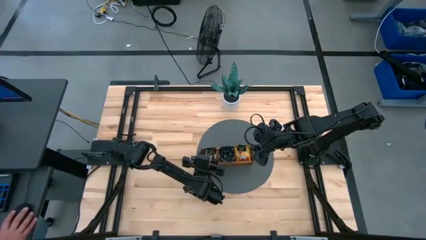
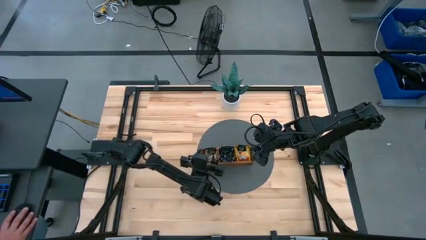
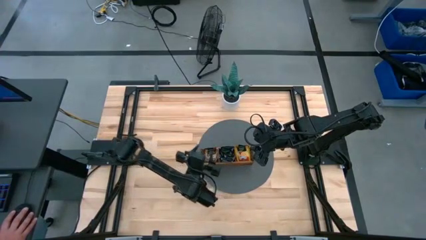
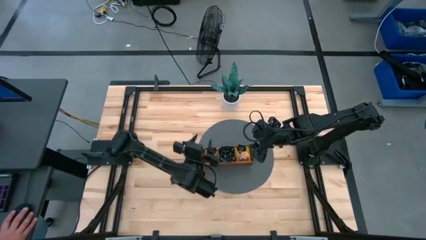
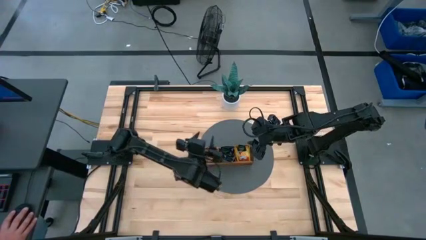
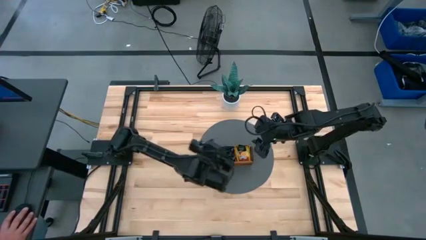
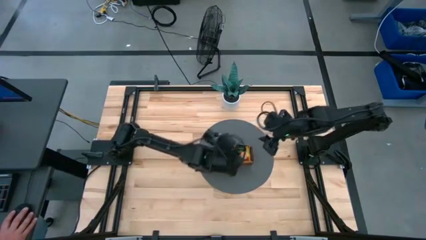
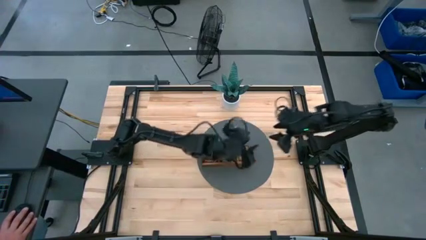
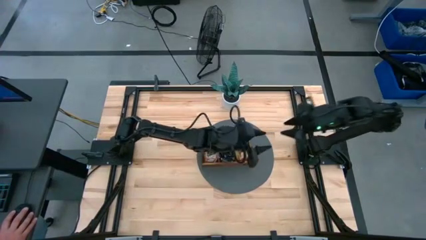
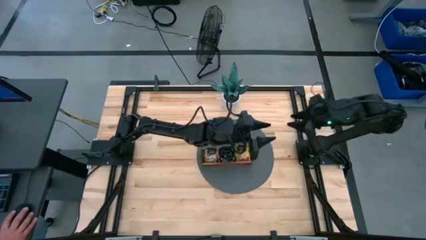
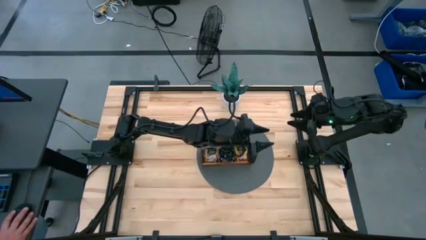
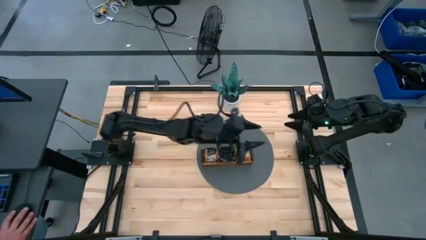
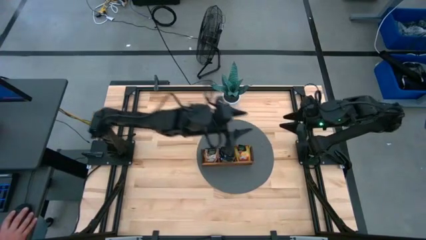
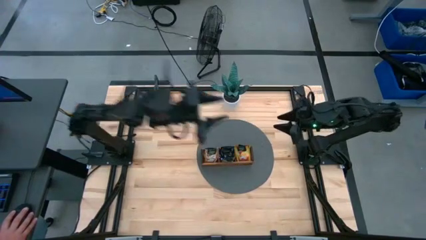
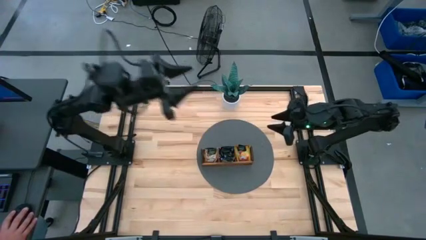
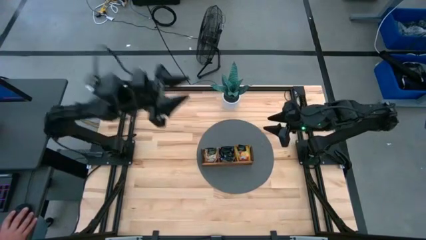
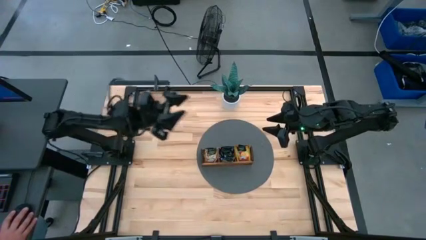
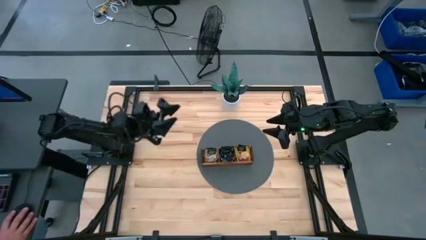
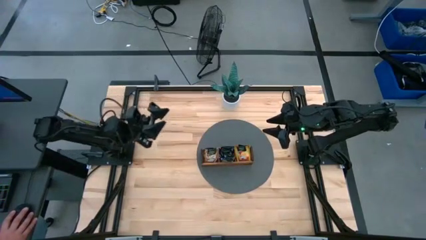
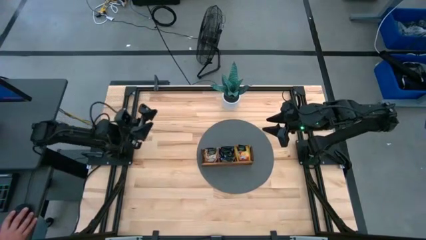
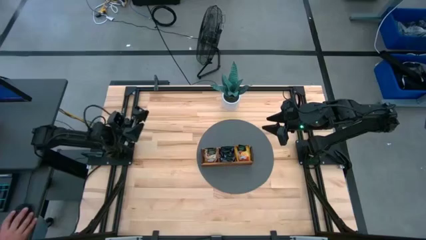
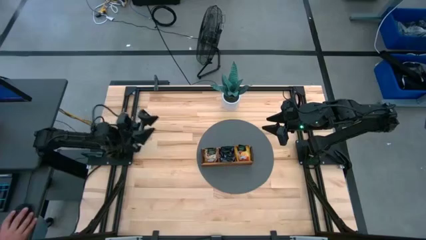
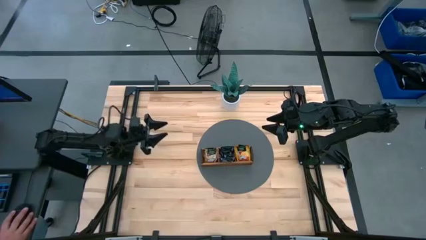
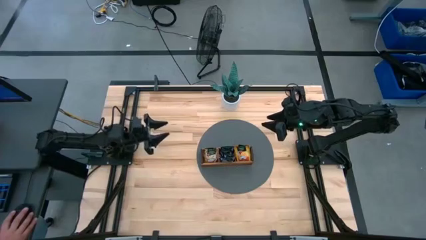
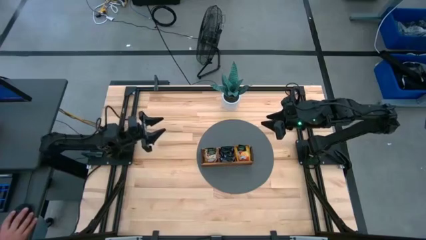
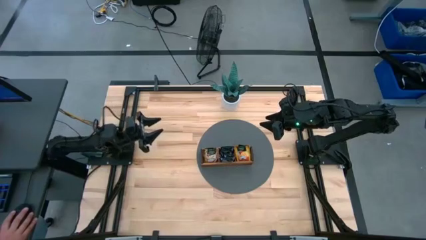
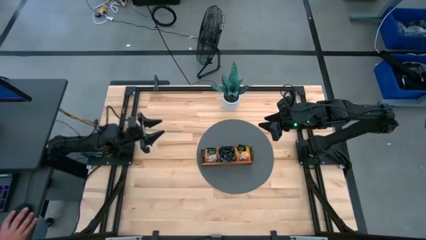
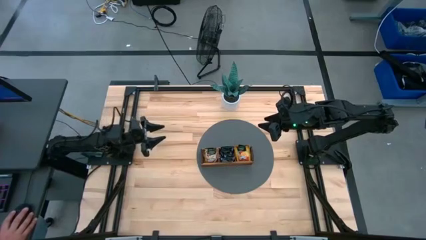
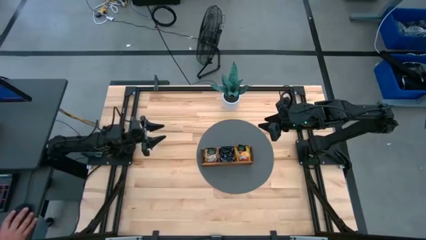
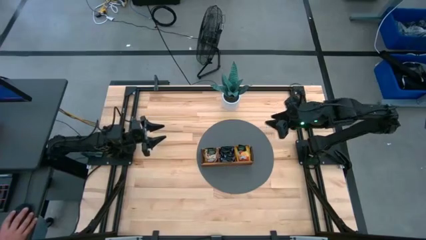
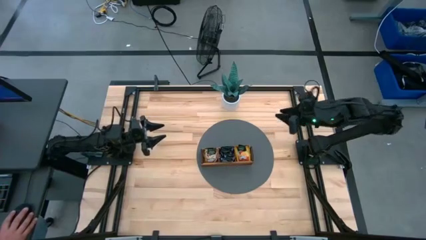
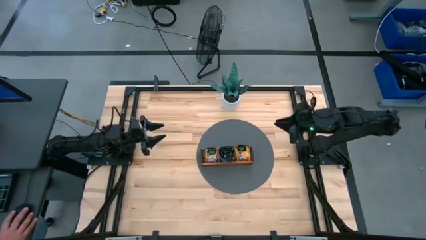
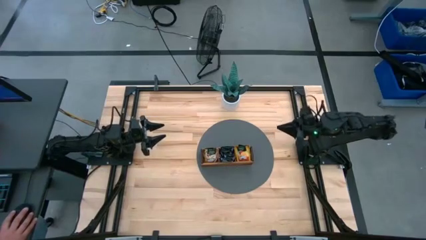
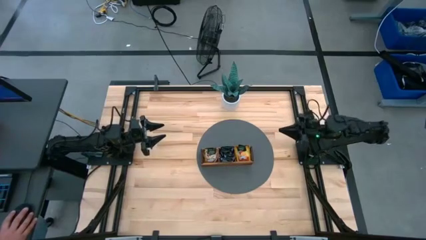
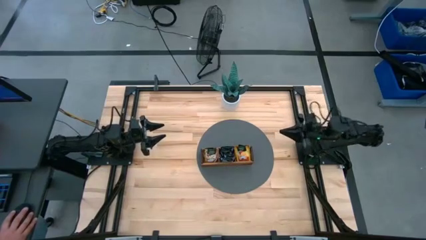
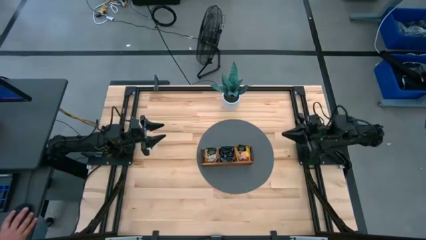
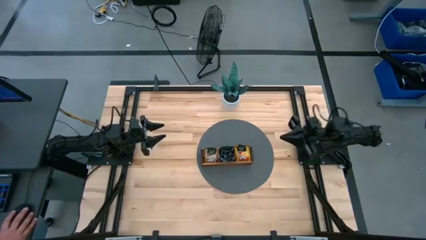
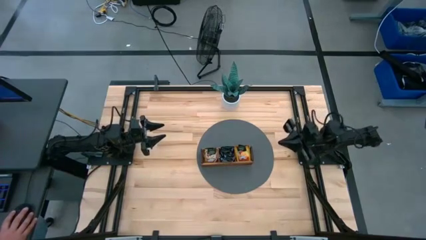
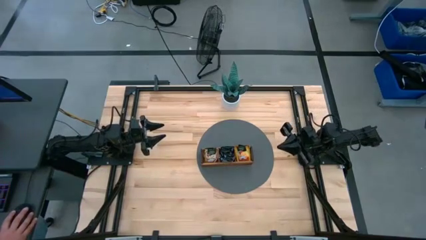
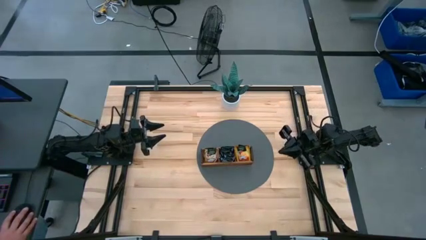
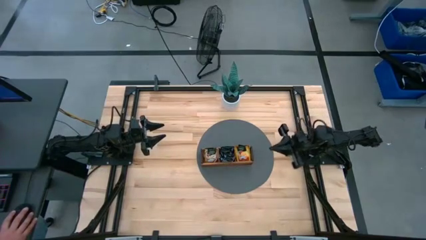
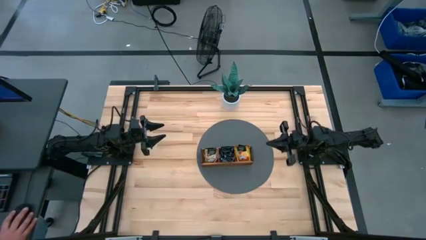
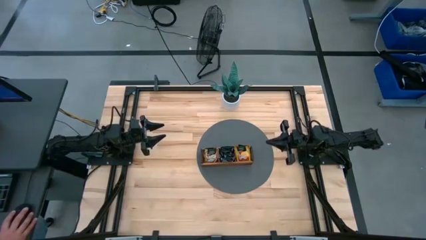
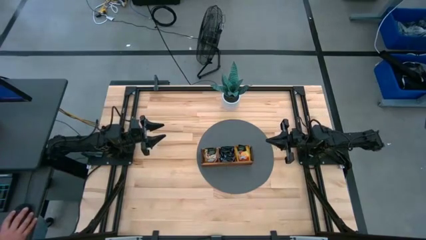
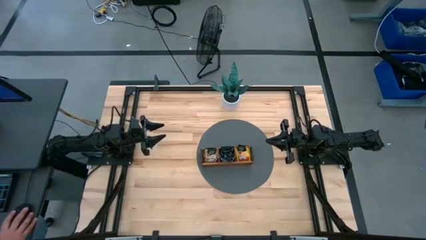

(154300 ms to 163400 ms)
Task: Pick & Place Tea
Return to Home Position

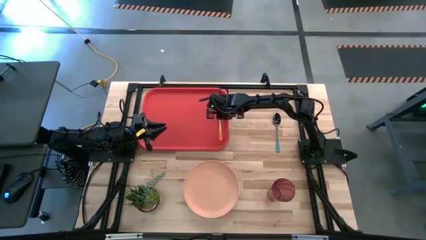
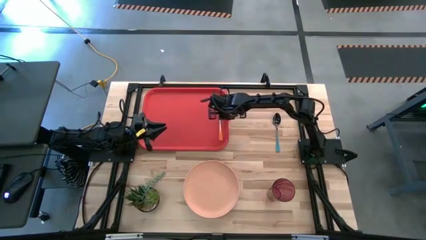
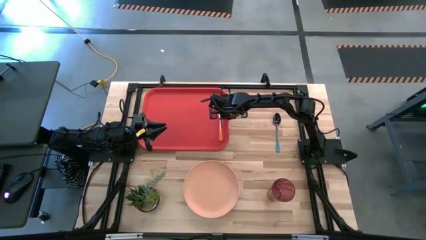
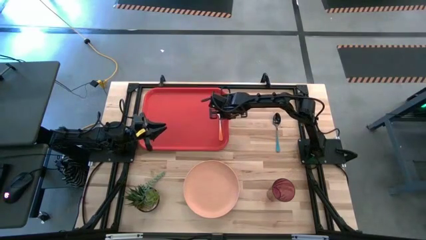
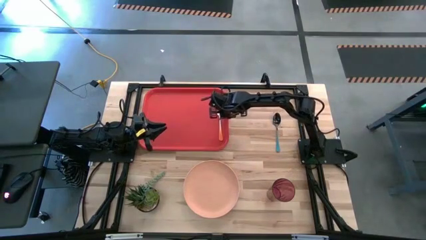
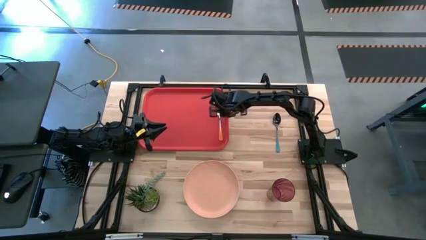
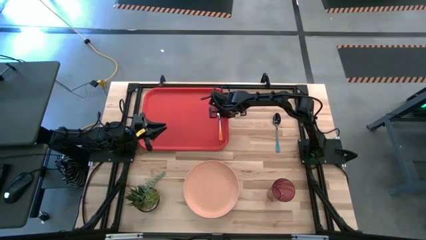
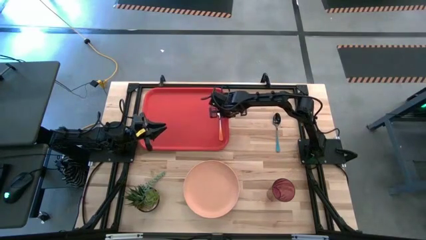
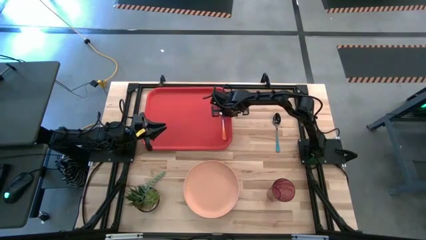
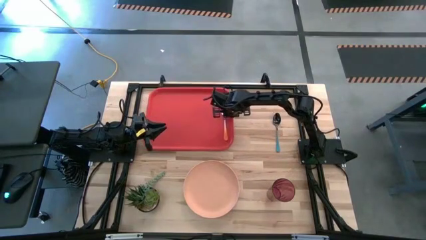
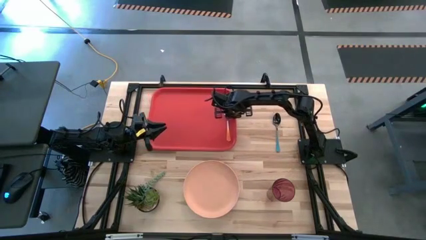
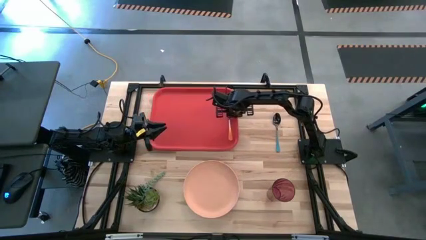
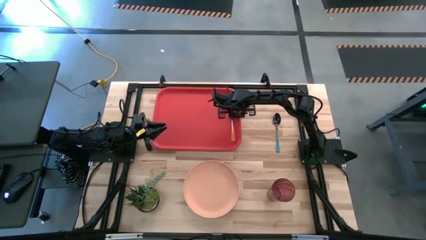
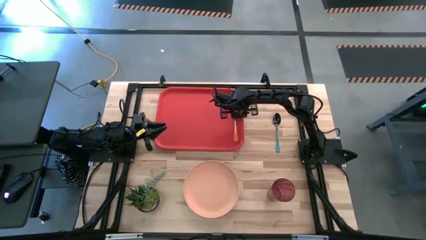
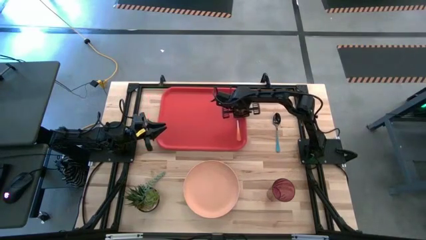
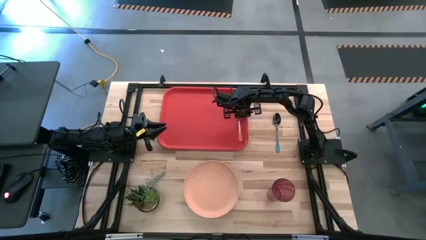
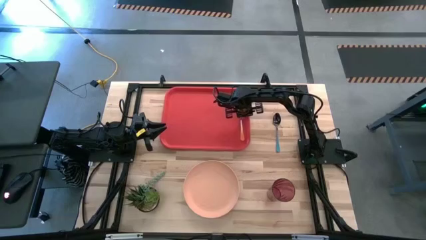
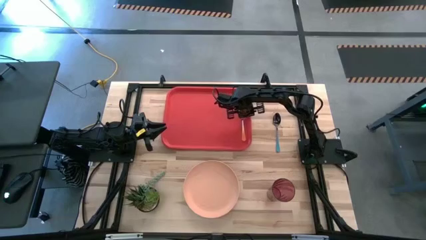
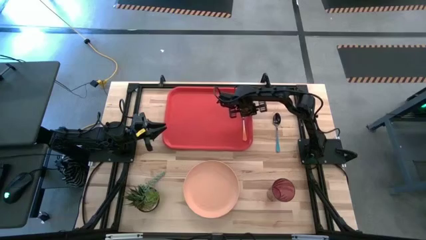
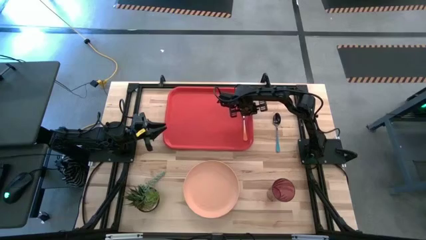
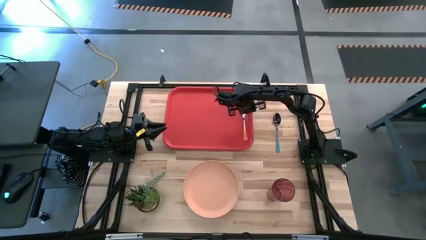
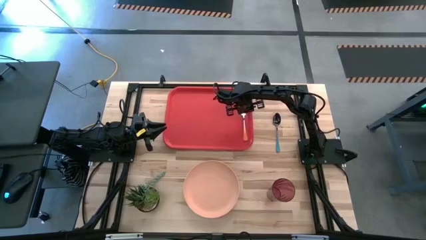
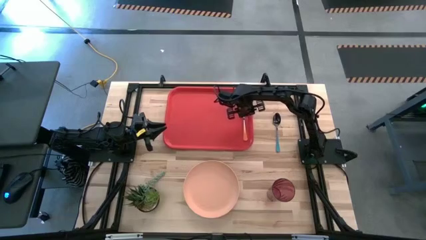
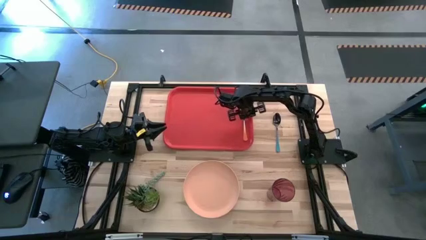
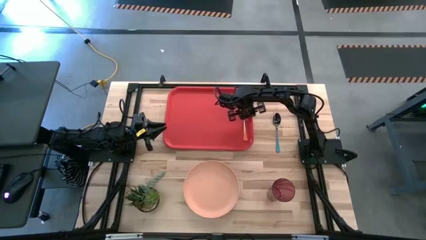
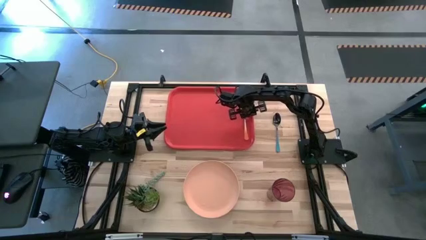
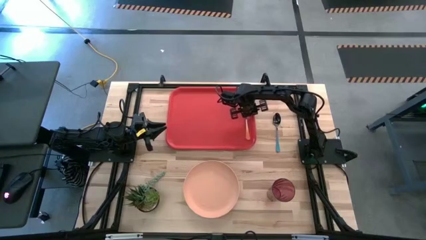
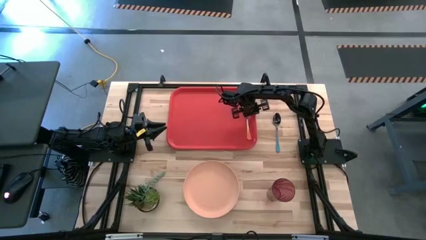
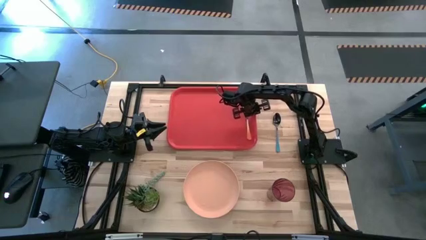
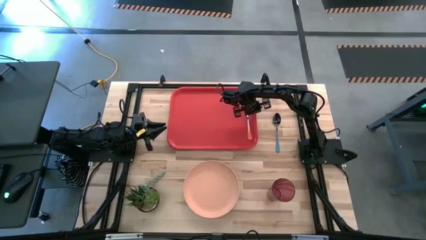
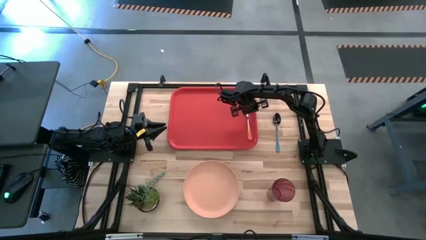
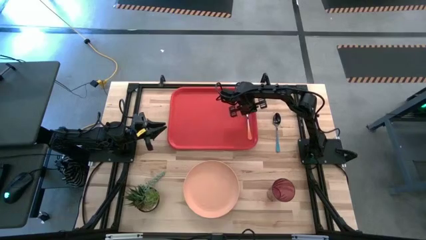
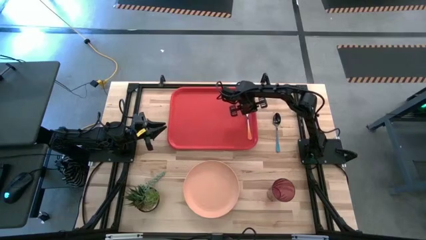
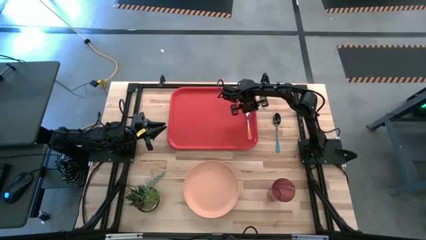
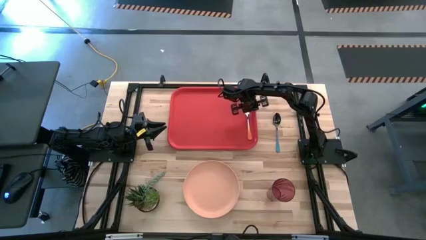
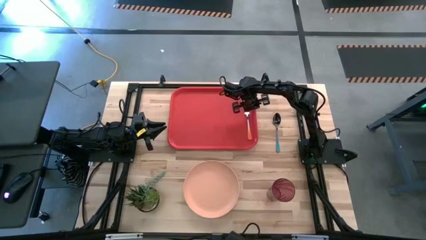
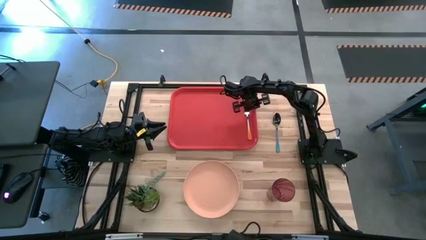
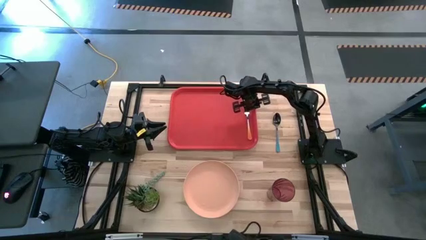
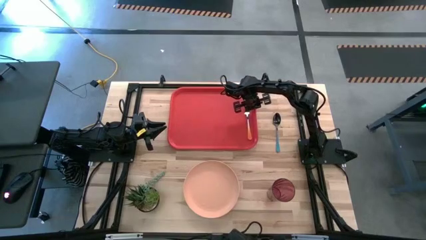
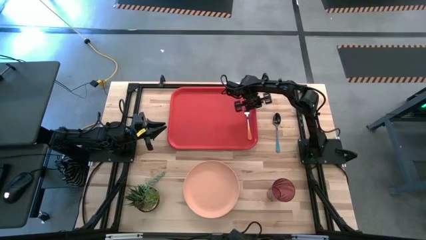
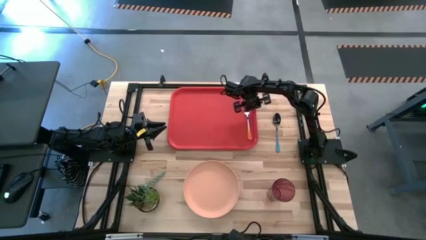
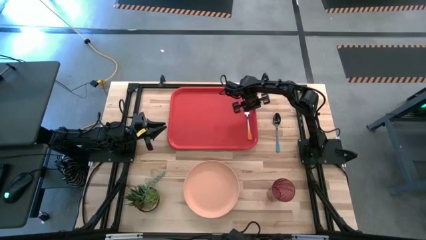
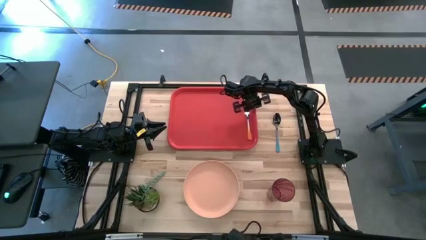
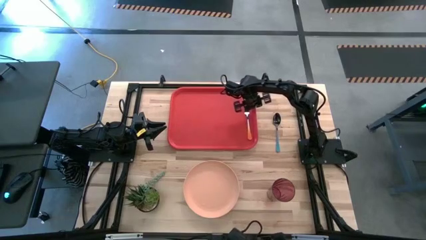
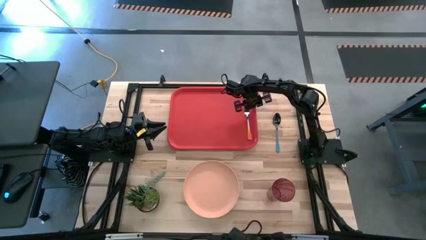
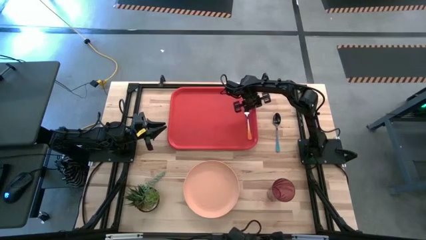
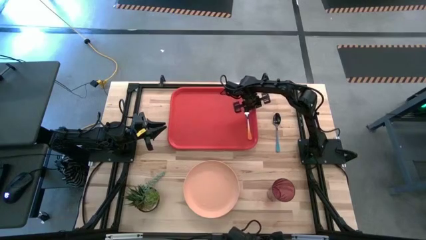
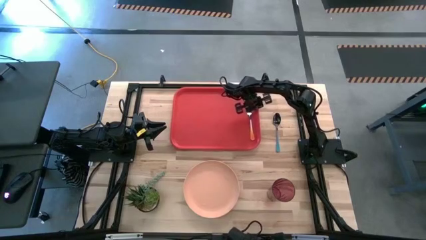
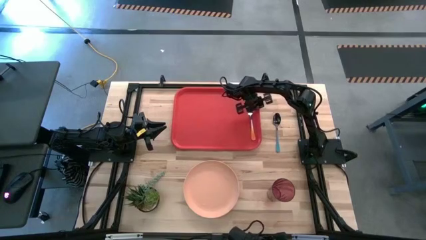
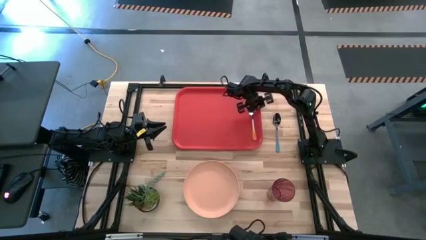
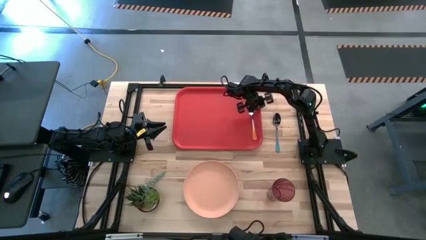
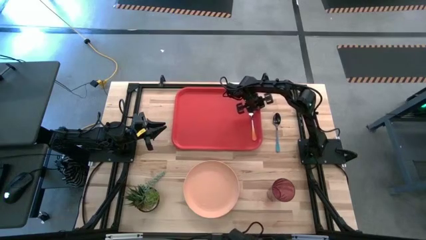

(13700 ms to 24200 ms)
Task: Pick and place plate/cup/fork/spoon on tray
Move the red serving tray to the top center of the table
